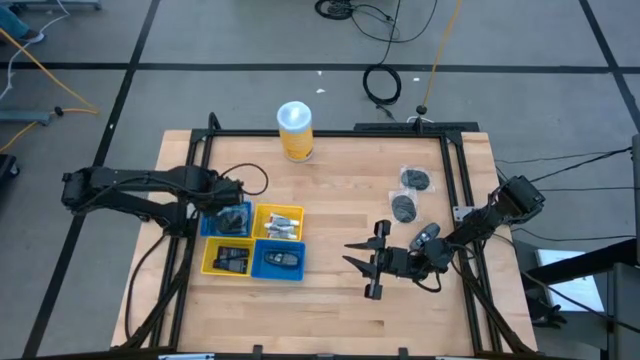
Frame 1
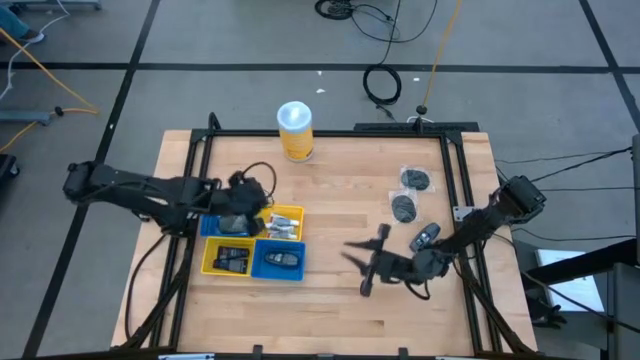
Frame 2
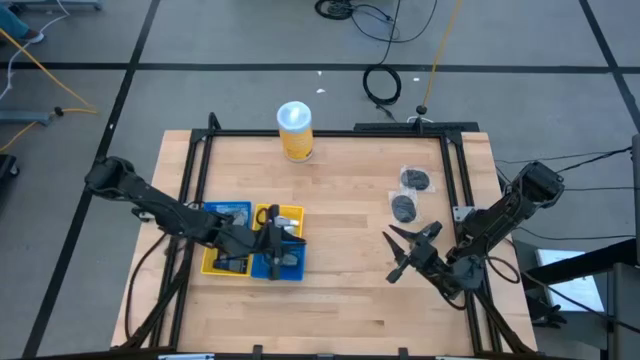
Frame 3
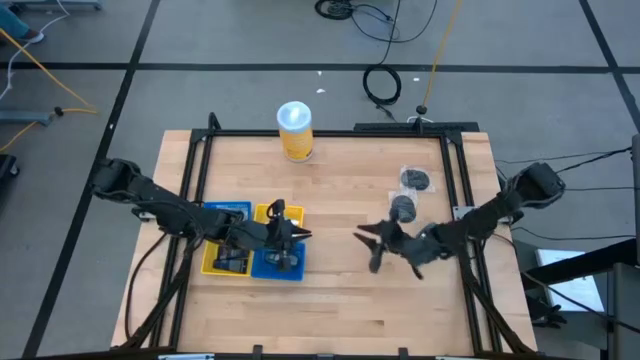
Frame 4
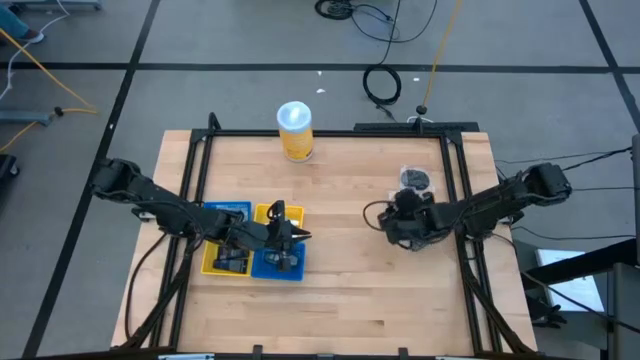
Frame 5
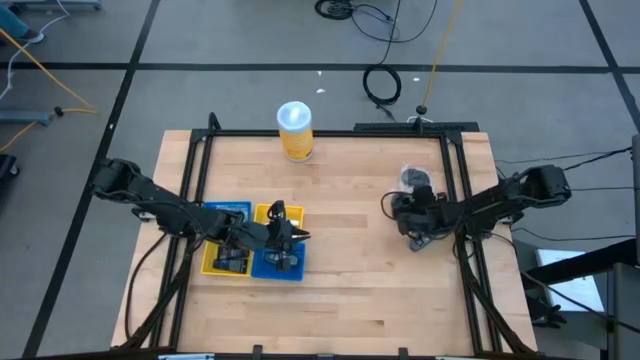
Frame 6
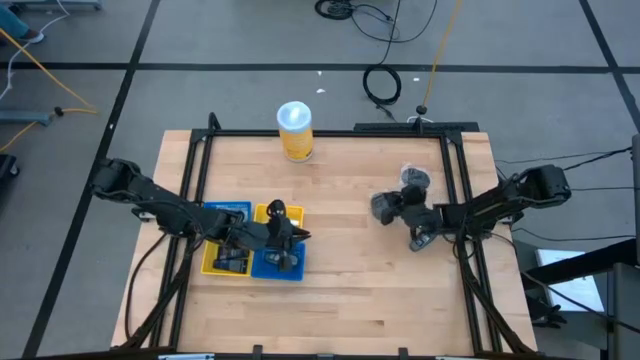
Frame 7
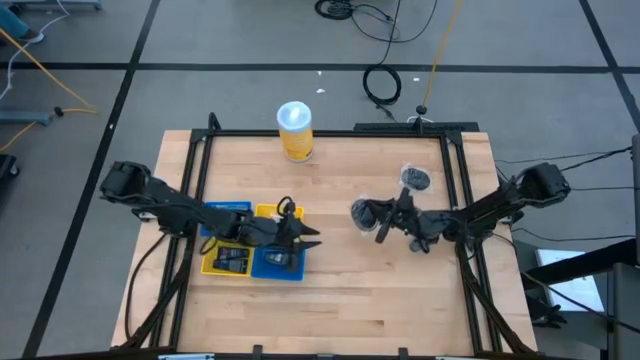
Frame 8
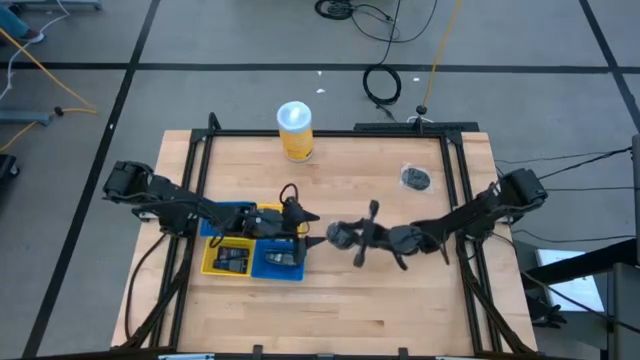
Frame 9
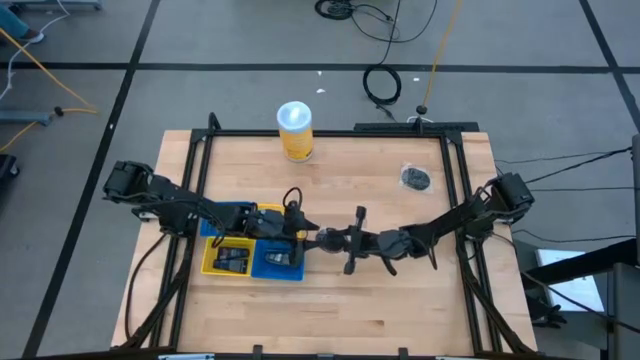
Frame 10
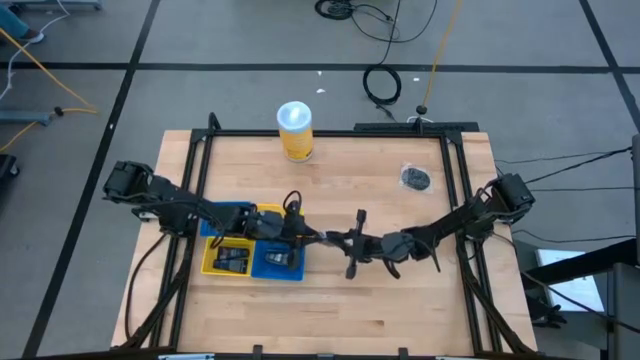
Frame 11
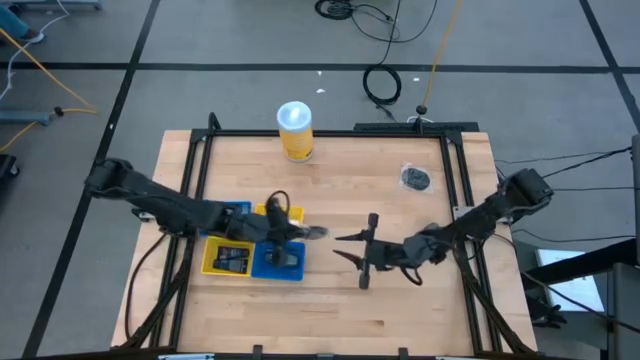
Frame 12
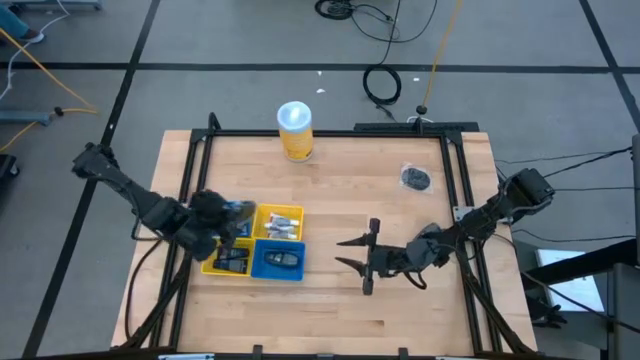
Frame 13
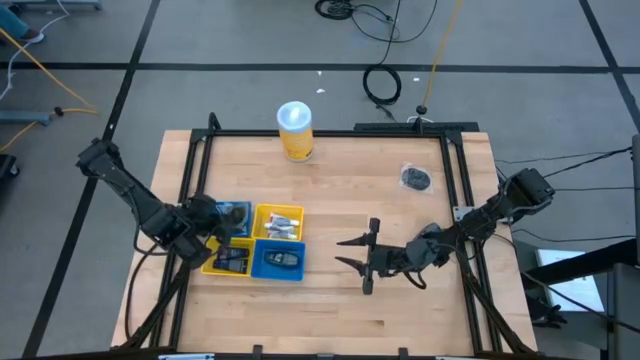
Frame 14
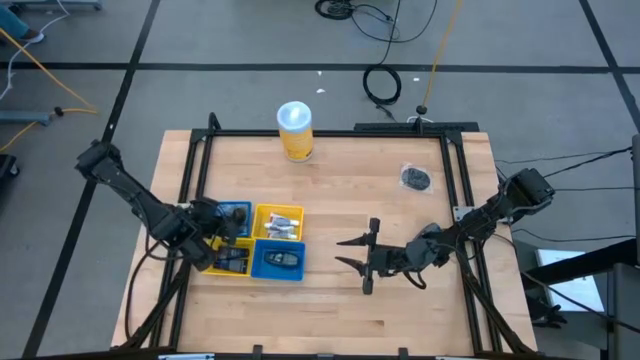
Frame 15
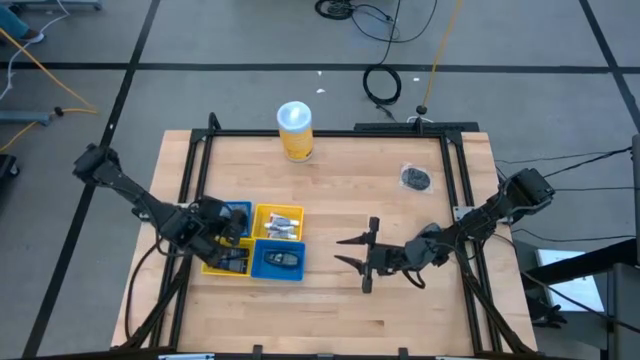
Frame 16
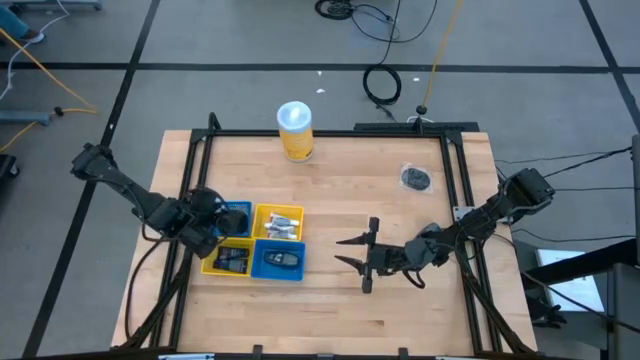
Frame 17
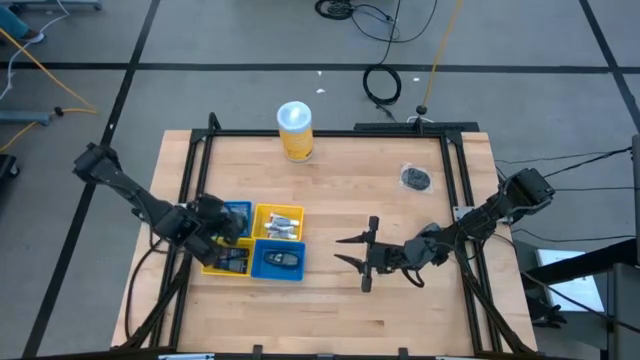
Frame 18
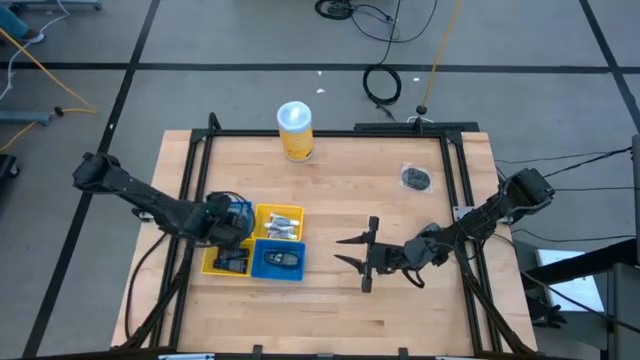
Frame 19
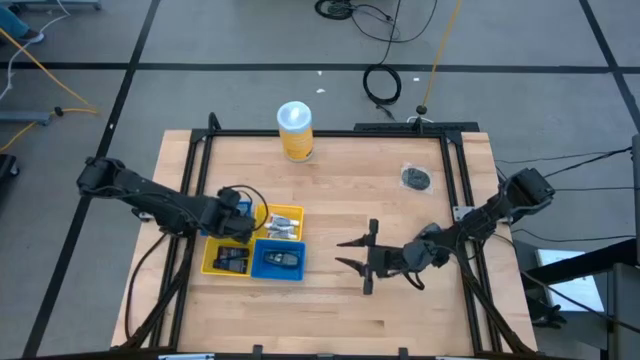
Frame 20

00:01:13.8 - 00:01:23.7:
Task: Pick & Place Travel size toiletries
Put the black hairbrush into the top blue bin

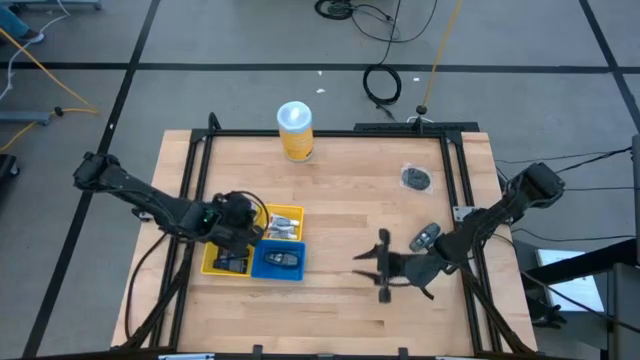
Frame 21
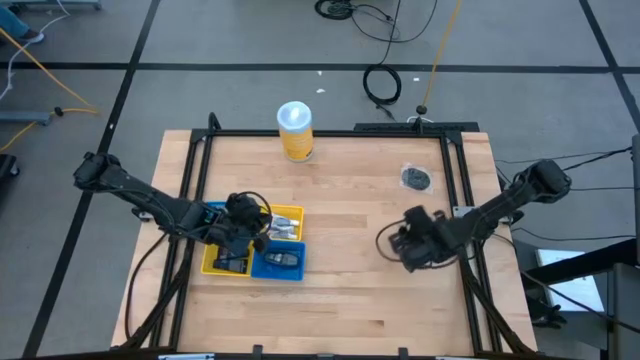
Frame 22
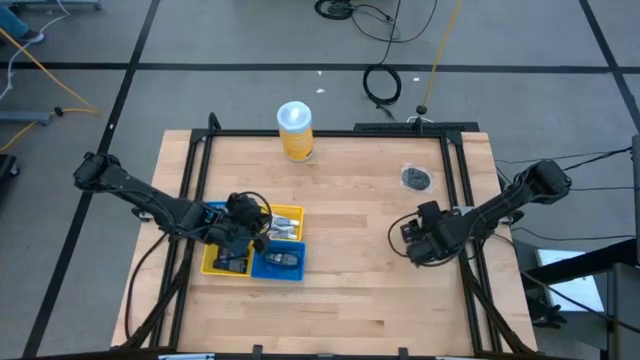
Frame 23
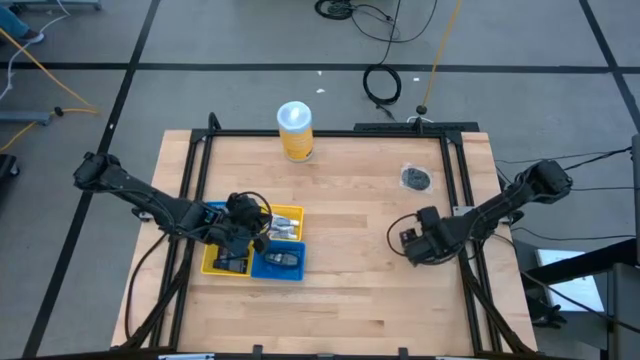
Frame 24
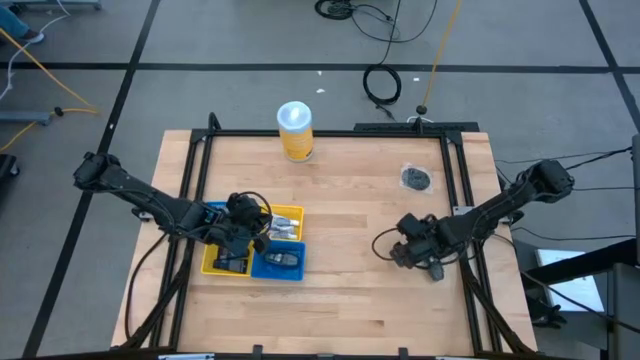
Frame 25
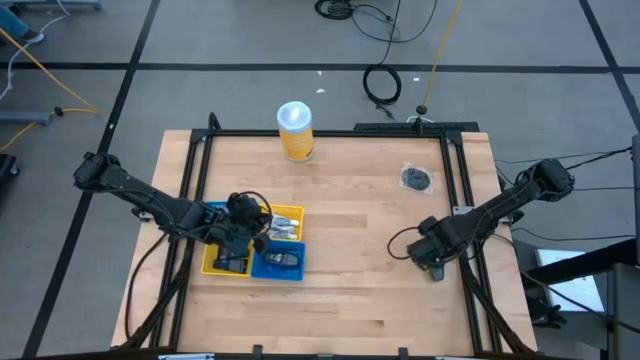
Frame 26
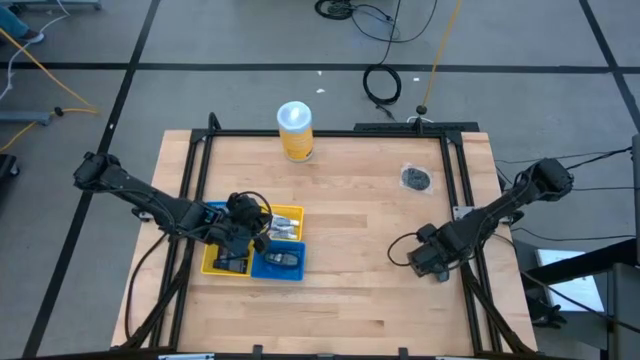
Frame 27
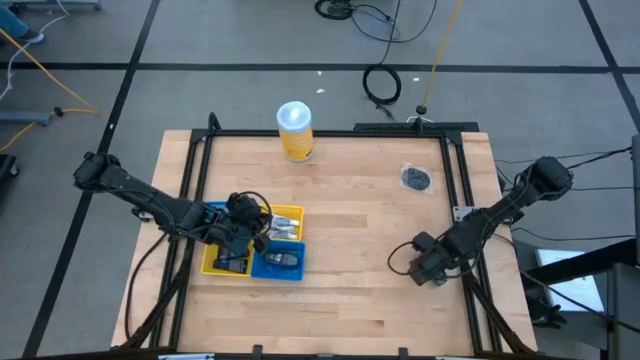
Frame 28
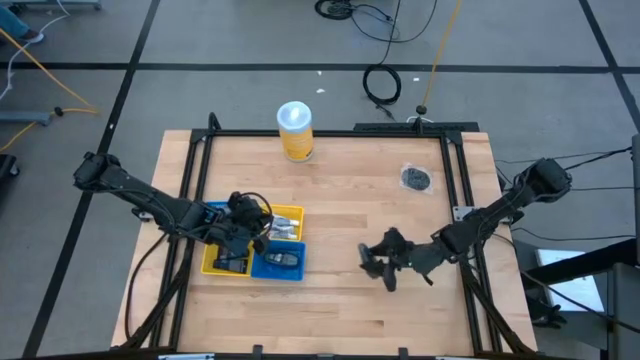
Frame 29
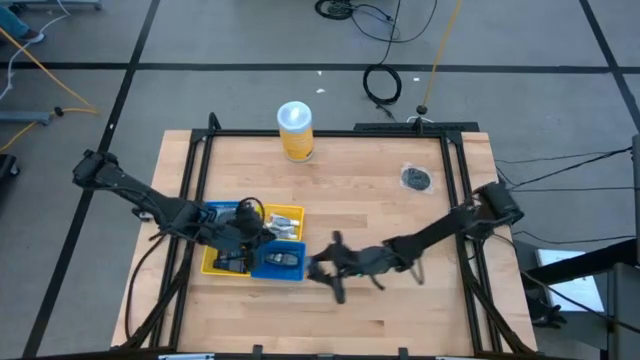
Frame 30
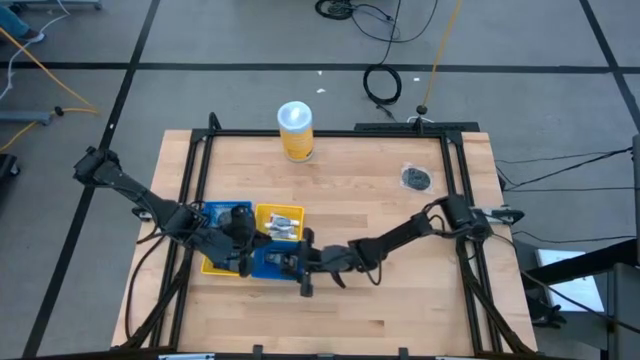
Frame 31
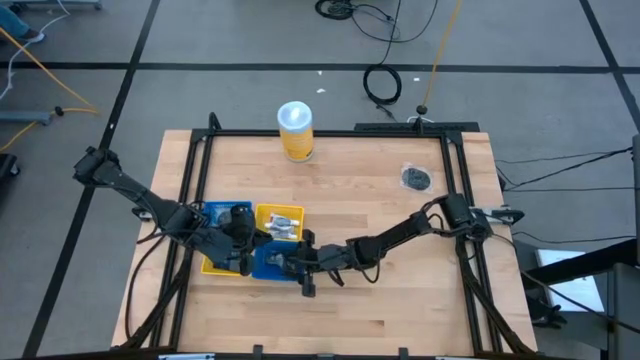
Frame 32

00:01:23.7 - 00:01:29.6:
Put the black deodorant into the bottom blue bin

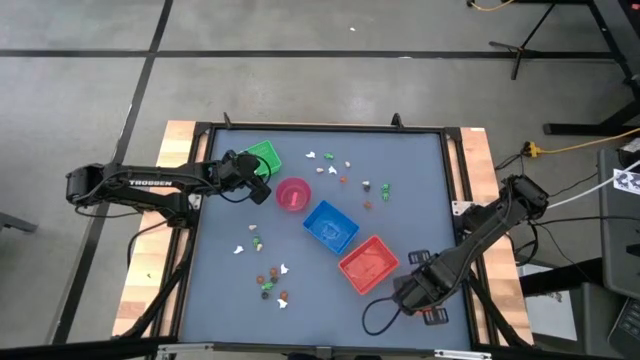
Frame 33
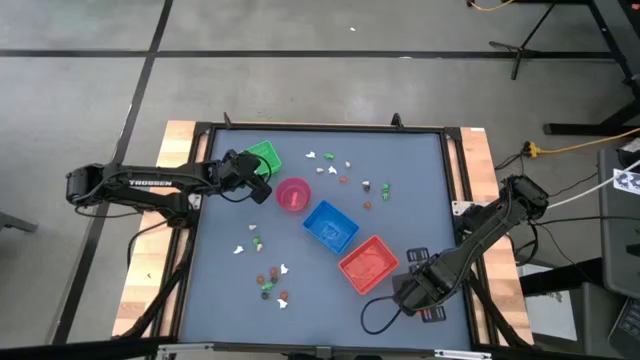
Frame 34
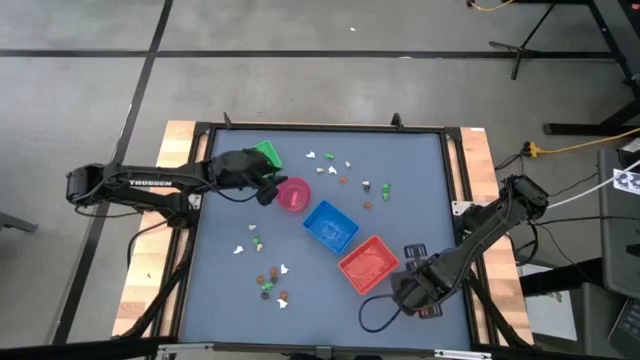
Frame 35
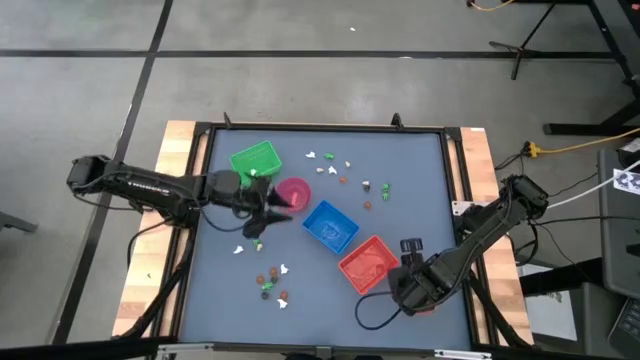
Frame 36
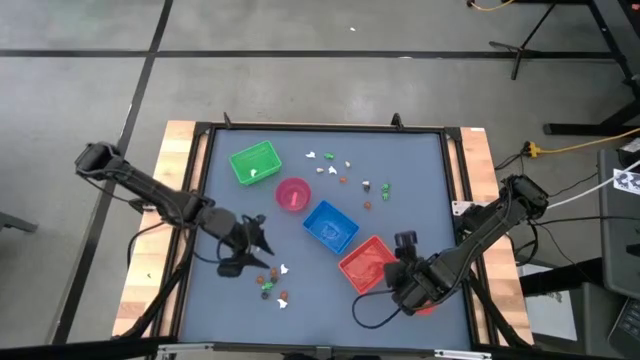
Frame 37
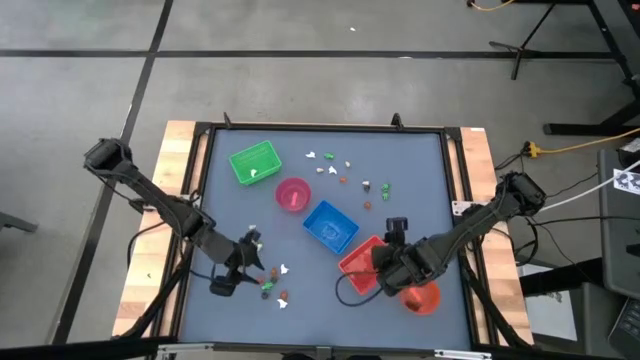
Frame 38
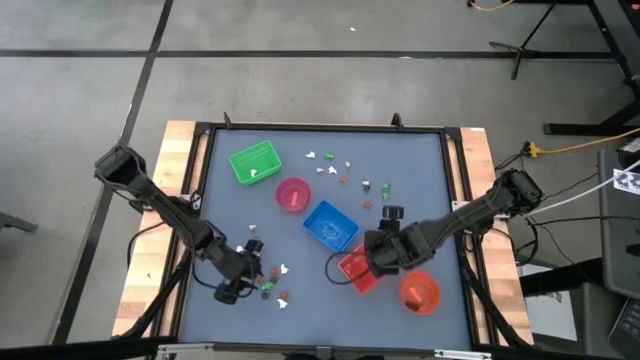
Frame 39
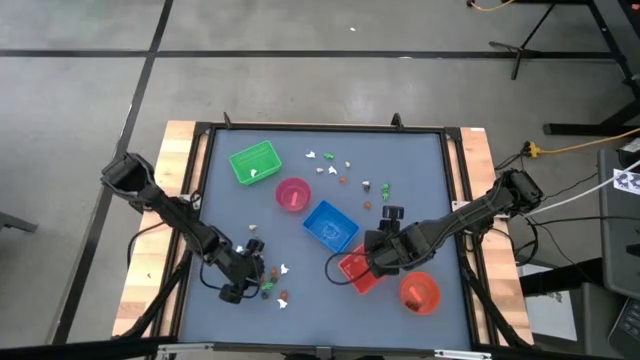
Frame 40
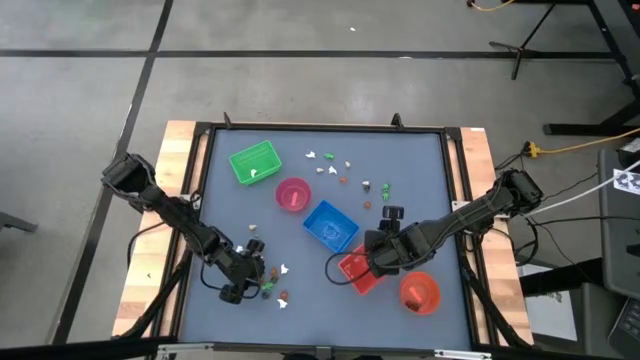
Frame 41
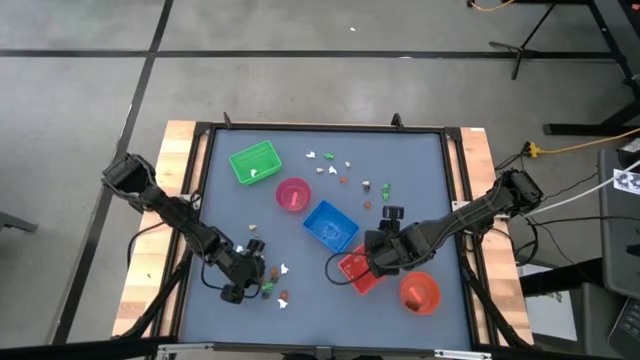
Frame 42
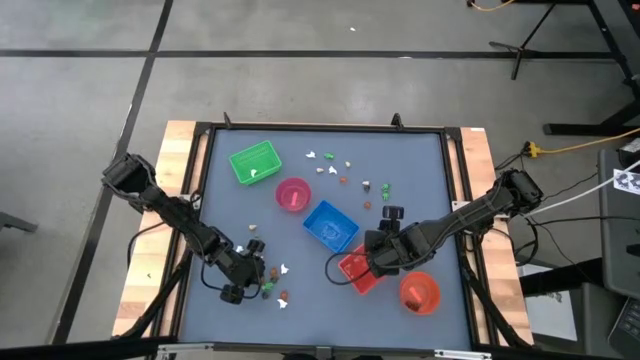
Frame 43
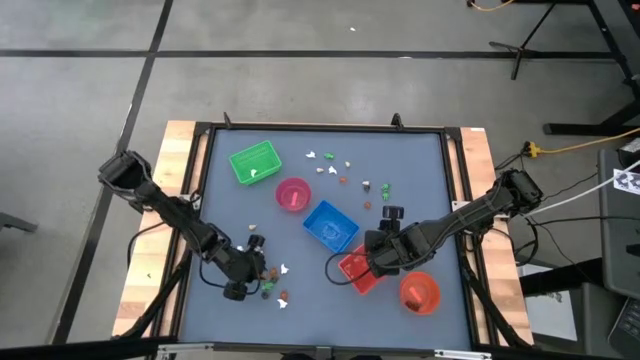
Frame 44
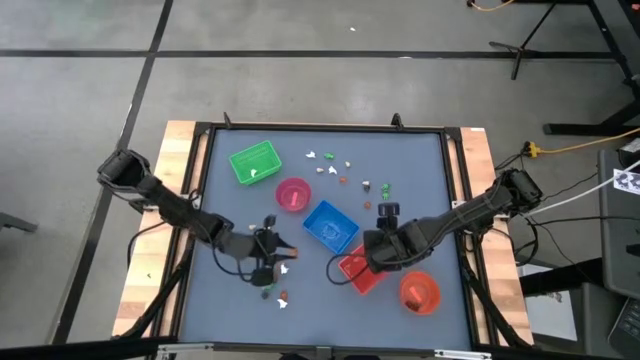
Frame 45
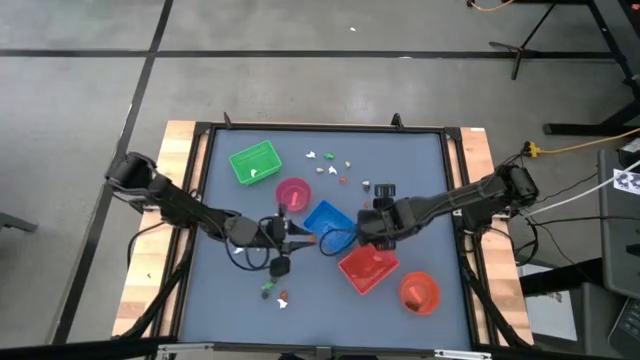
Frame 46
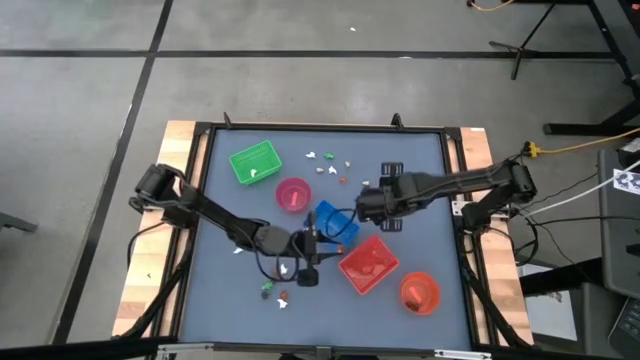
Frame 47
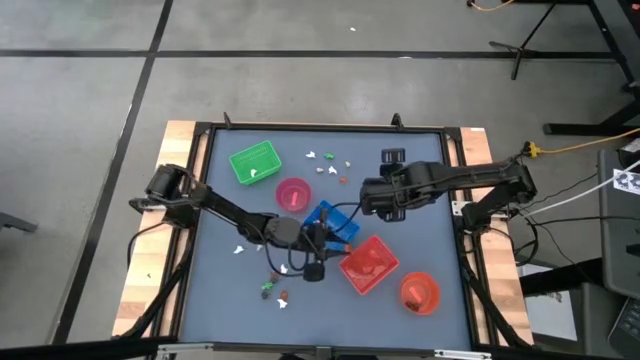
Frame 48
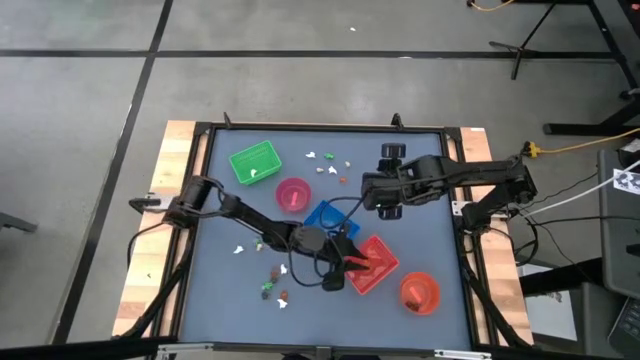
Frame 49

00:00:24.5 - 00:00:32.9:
Task: Sort Halloween decoration
Put the orange pumpkin toy into the orange bin
